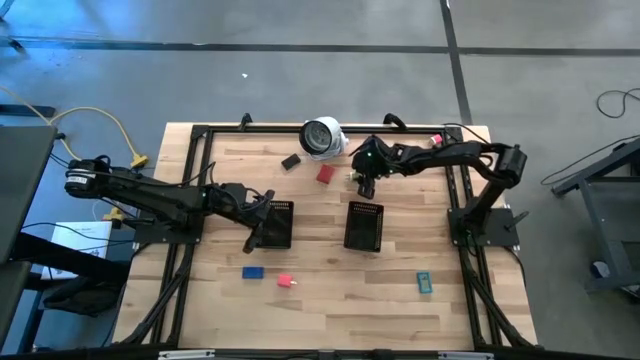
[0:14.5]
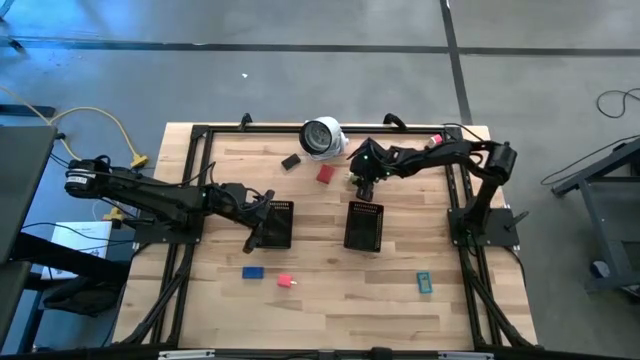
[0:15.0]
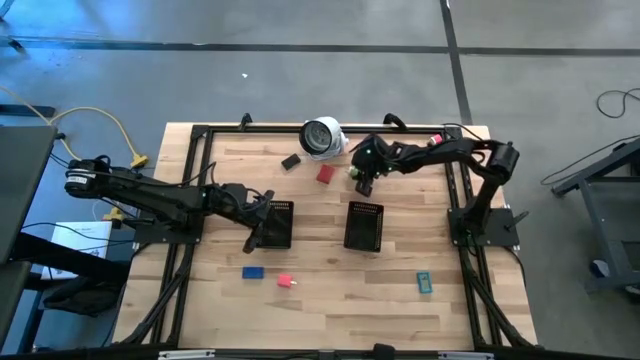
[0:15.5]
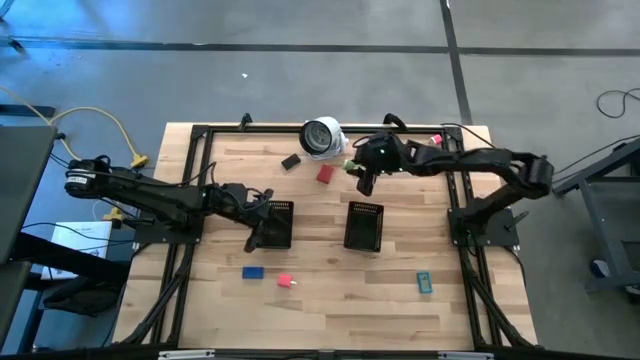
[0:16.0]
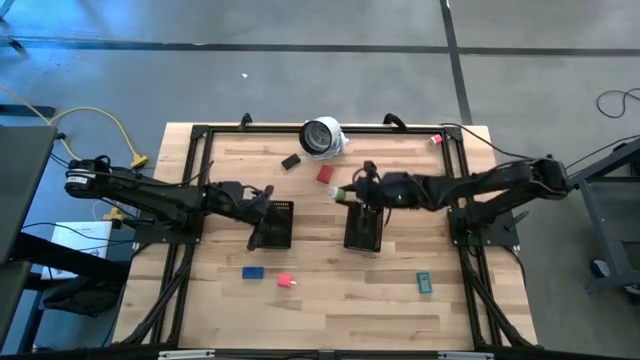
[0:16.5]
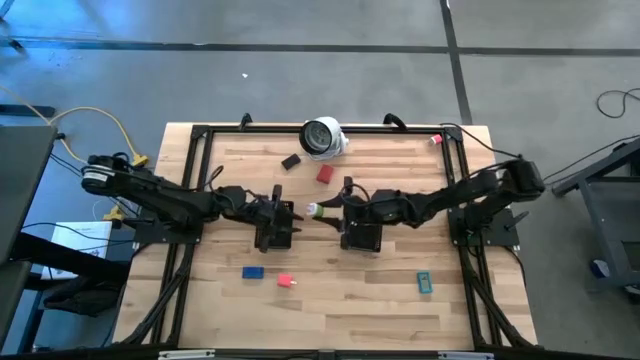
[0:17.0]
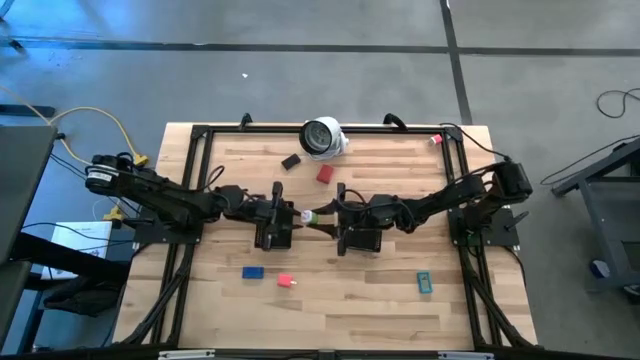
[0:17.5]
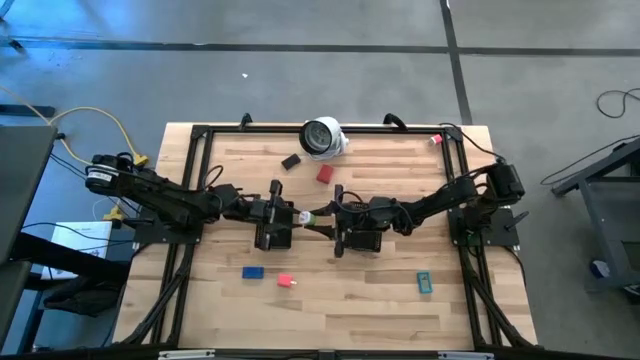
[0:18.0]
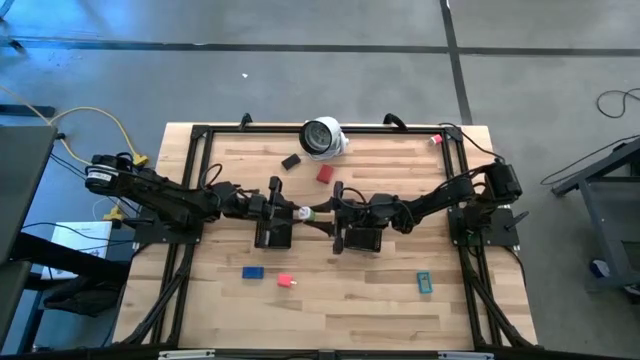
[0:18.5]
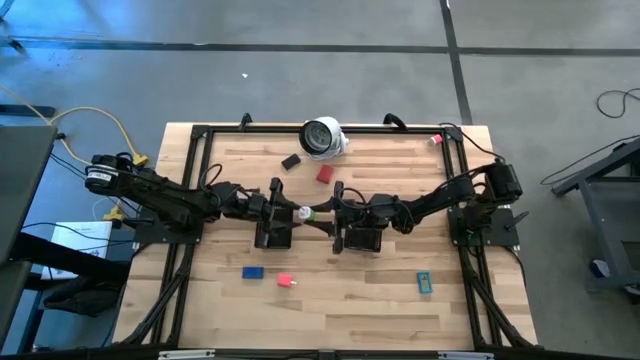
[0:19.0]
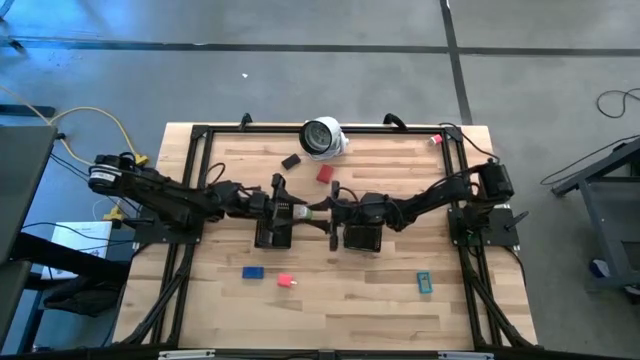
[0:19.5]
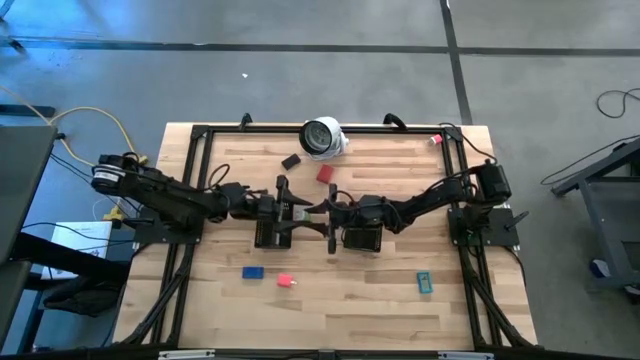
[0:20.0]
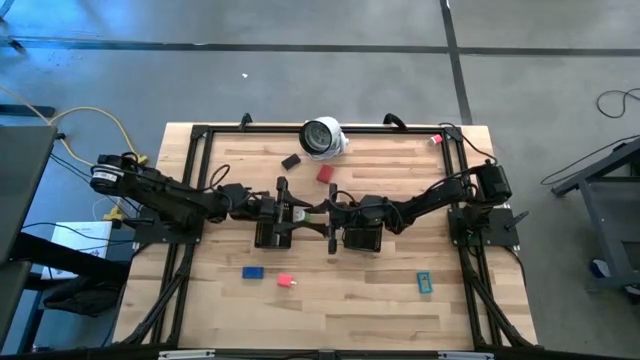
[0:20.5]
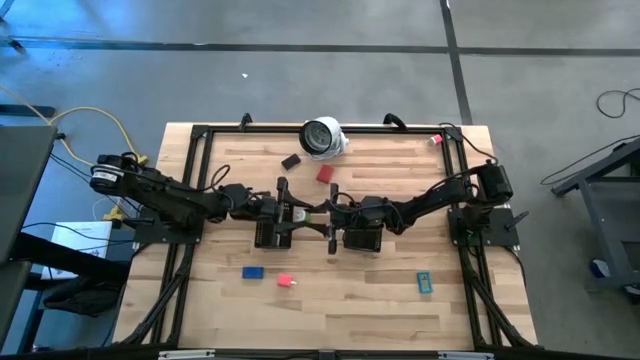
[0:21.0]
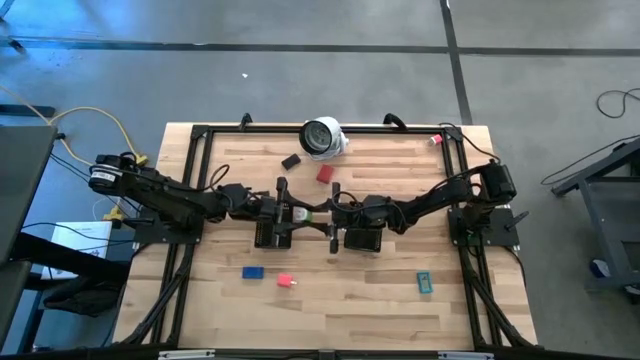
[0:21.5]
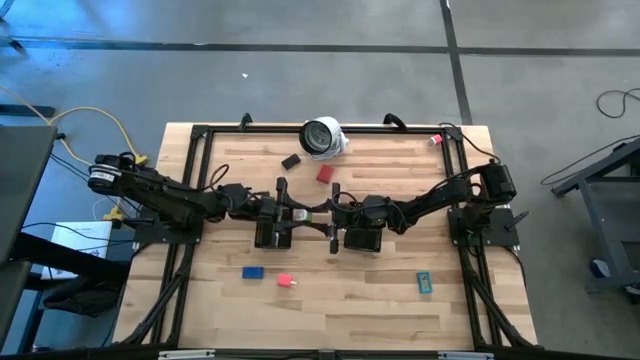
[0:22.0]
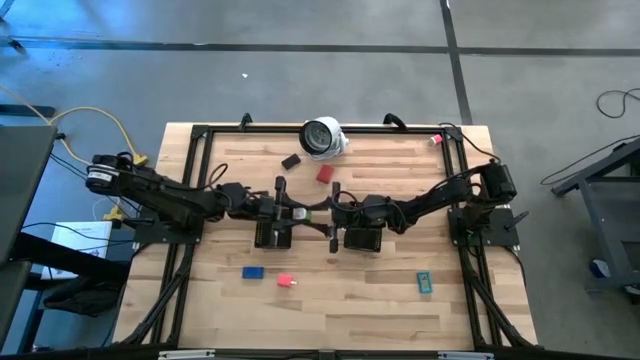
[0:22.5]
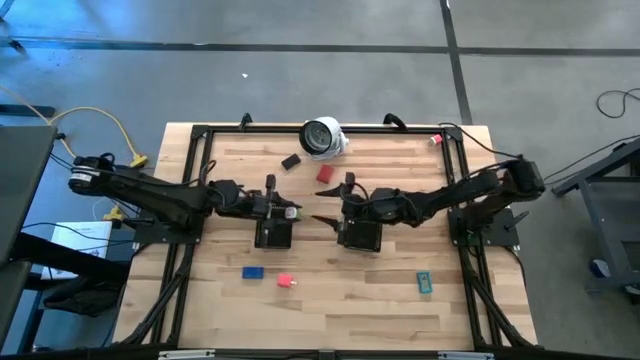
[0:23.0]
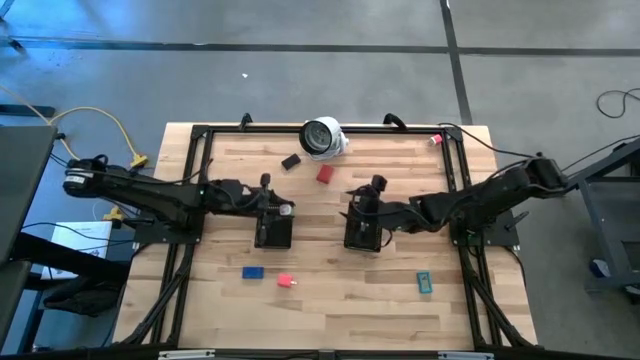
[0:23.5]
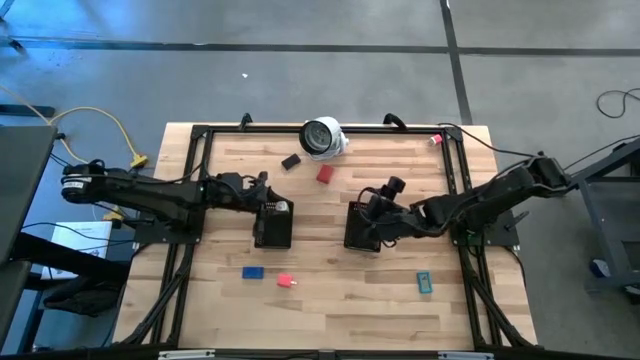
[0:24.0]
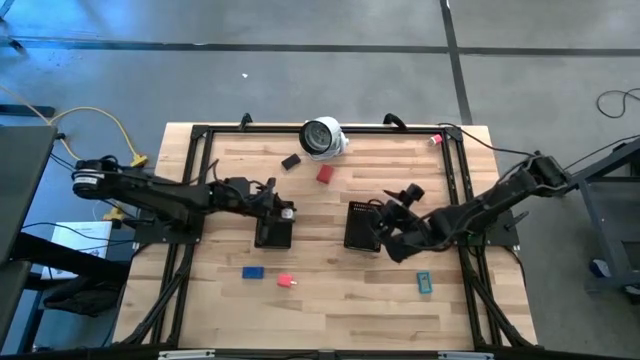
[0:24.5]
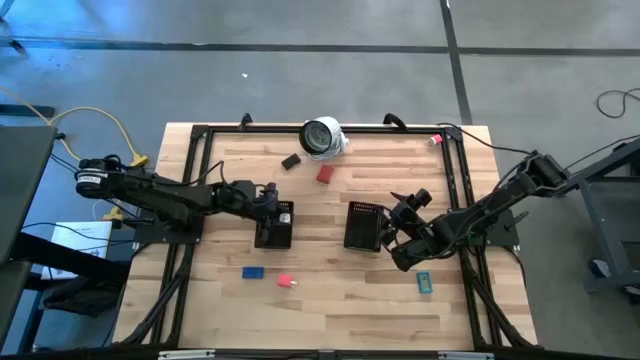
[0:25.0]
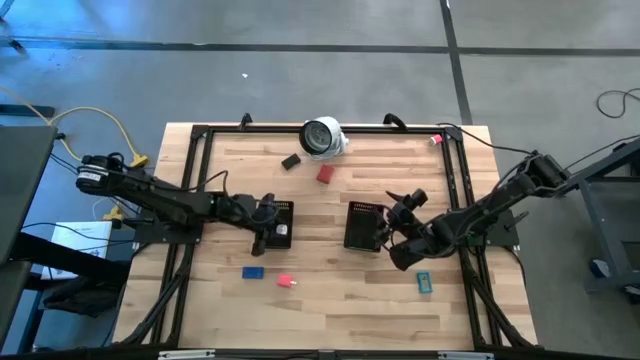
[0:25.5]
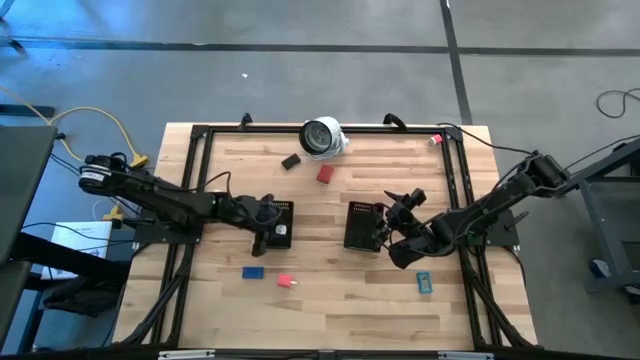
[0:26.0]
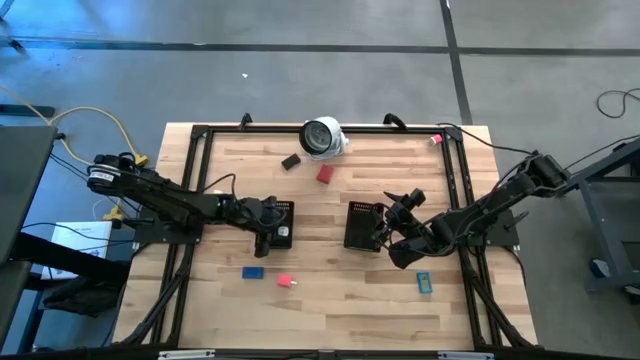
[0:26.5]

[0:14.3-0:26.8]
Task: Pick & Place Office items
Put the green charger adapter into the left black bin

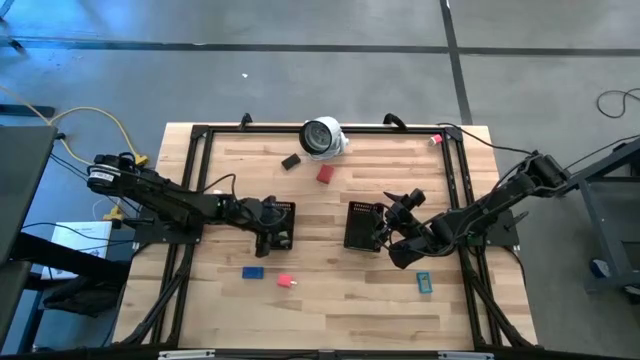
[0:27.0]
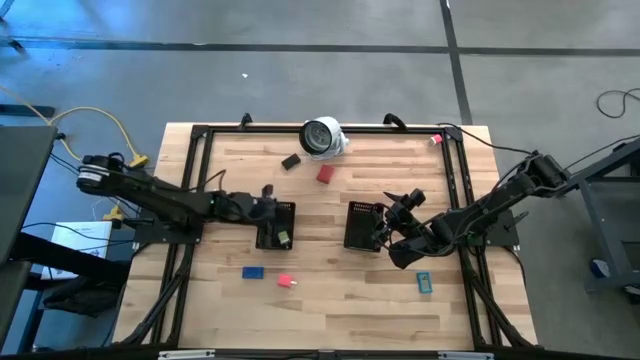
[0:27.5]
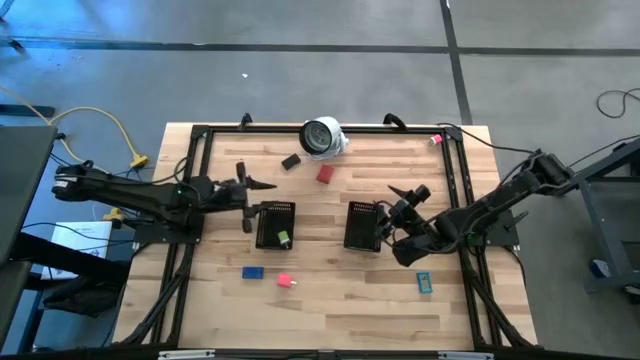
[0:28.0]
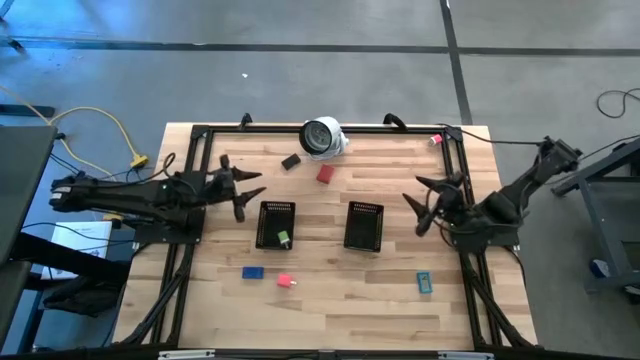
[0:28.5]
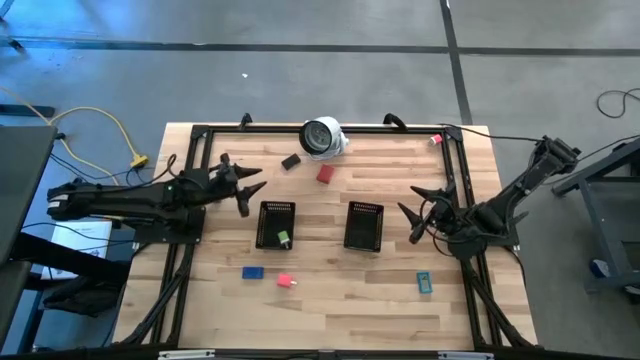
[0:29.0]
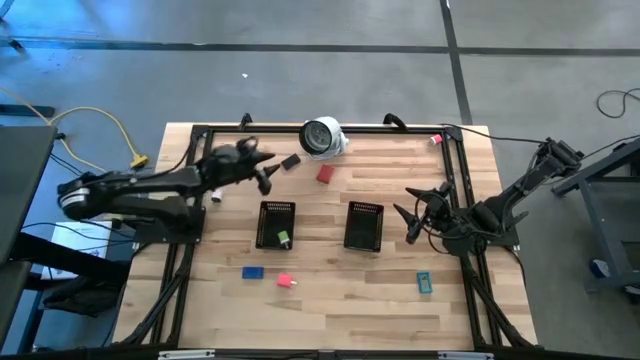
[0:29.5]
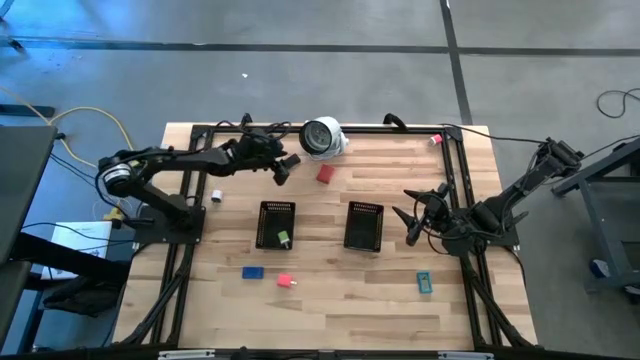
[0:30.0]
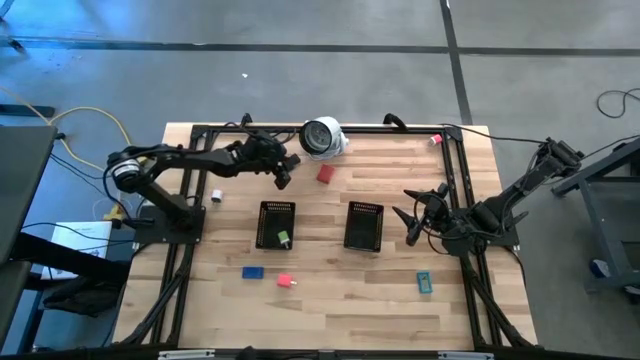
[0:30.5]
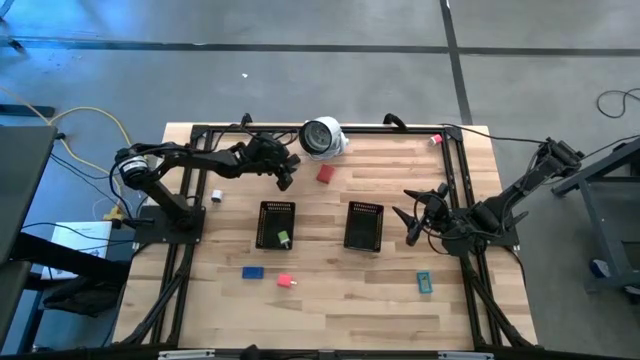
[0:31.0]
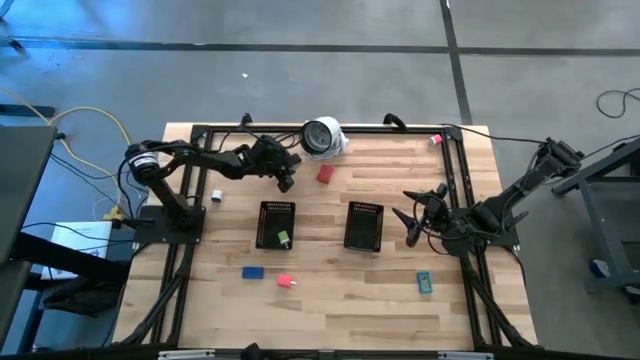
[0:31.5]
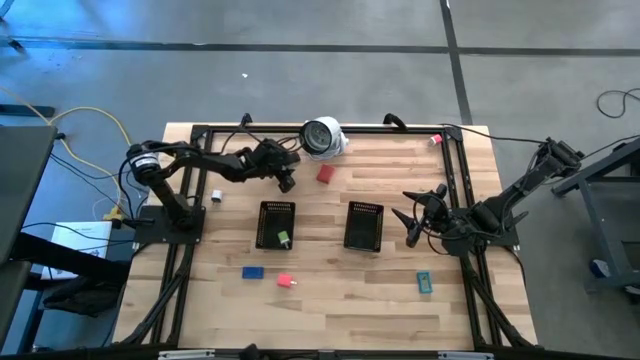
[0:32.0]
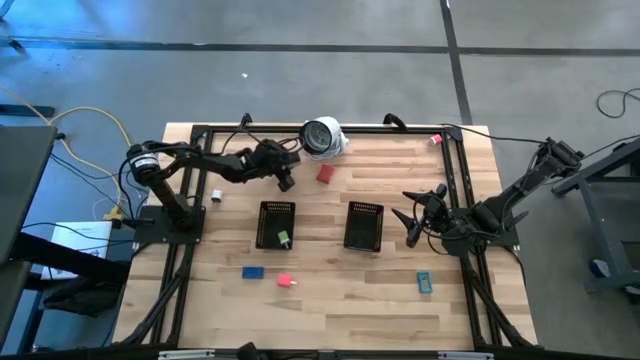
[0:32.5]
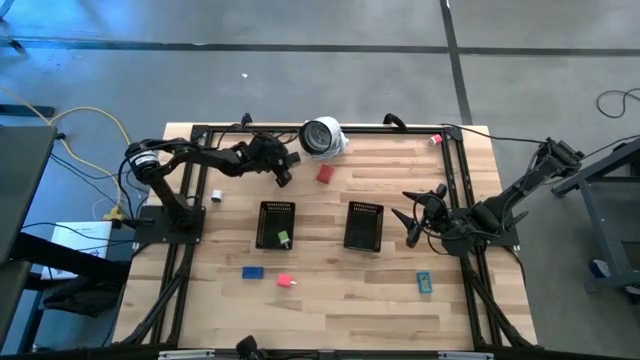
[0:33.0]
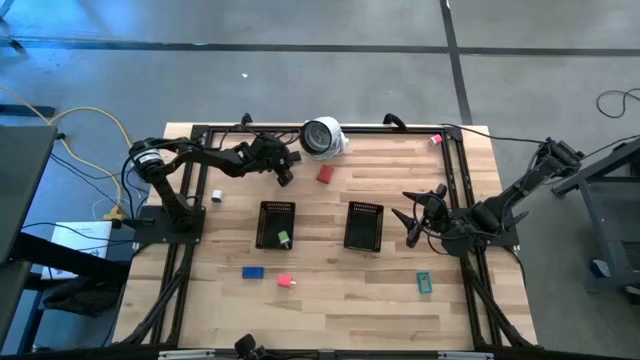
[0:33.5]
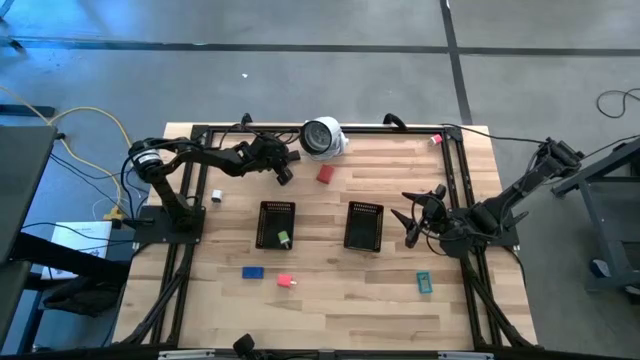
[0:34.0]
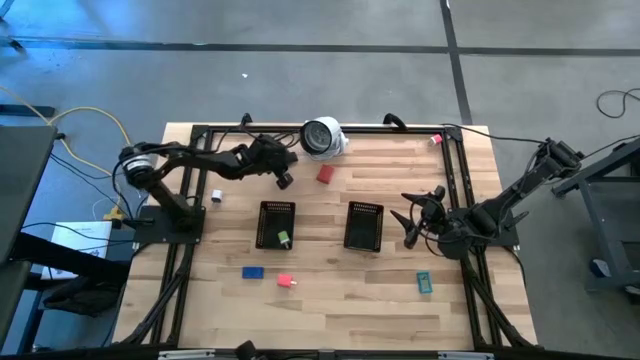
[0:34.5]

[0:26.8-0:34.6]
Put the black digital clock into the right black bin
